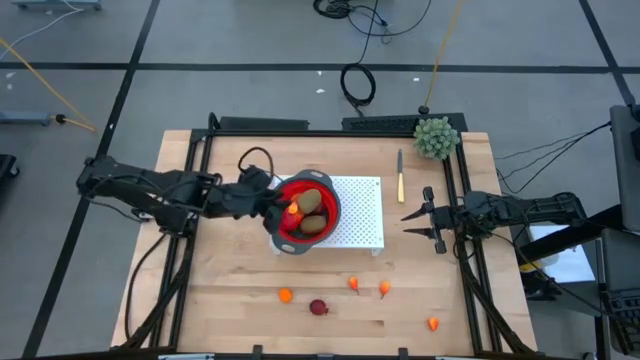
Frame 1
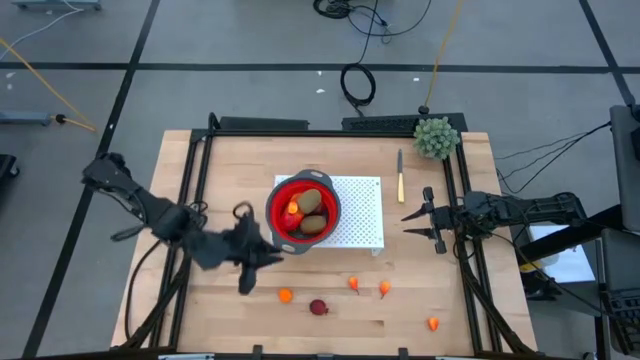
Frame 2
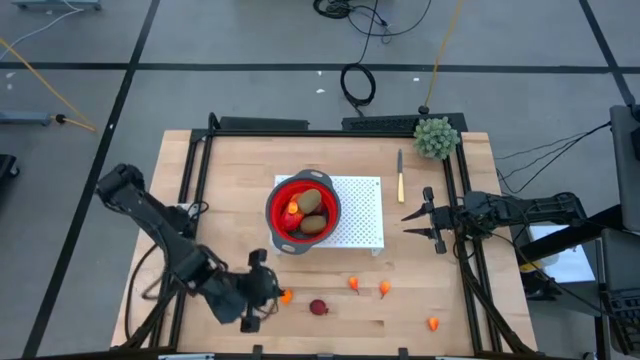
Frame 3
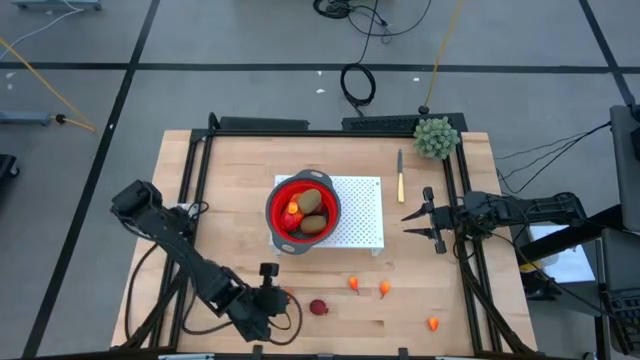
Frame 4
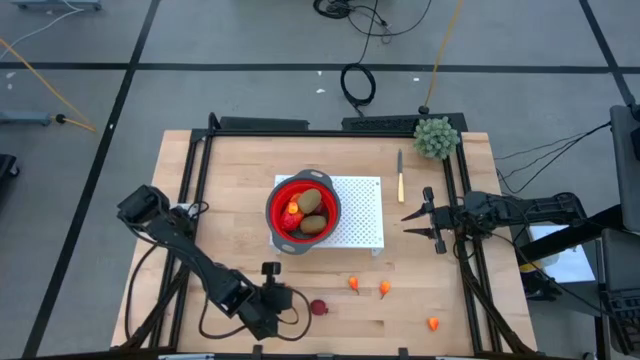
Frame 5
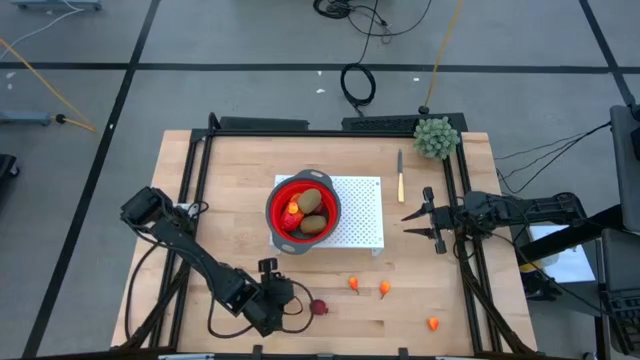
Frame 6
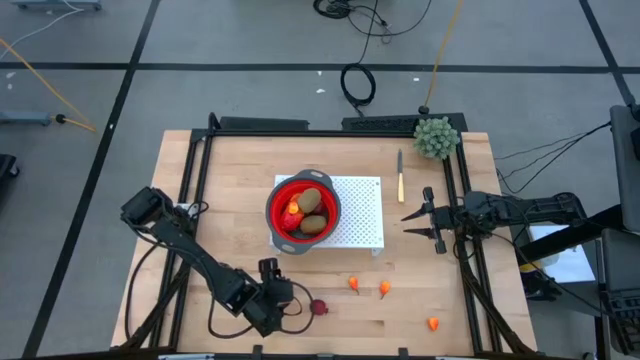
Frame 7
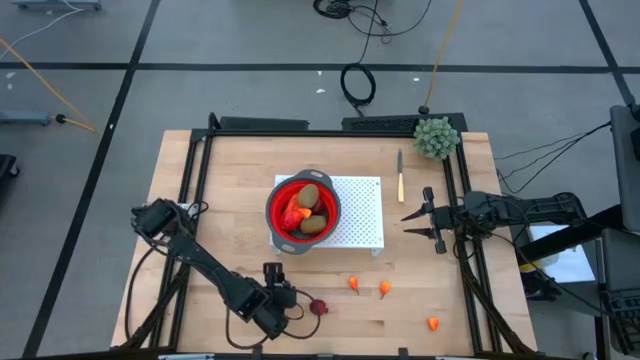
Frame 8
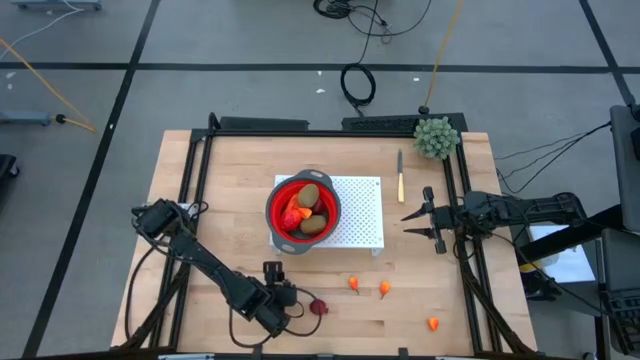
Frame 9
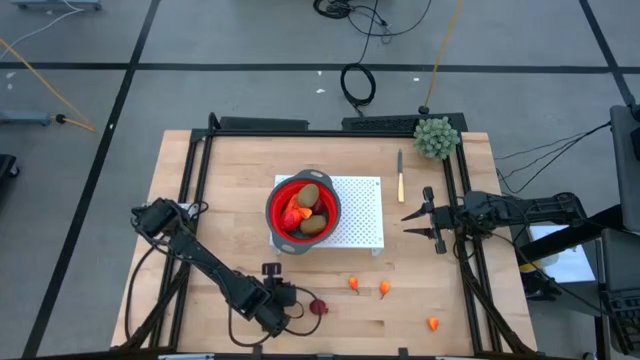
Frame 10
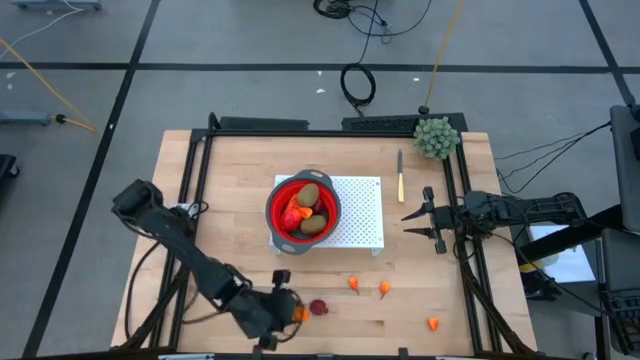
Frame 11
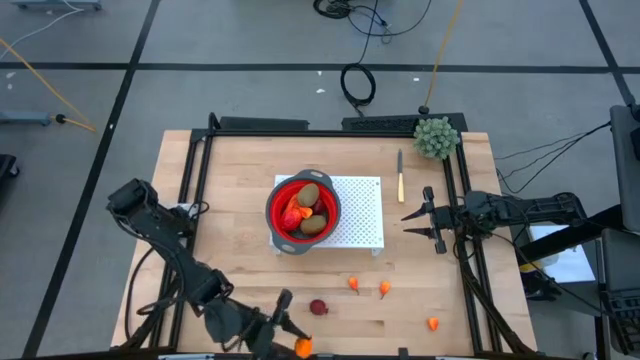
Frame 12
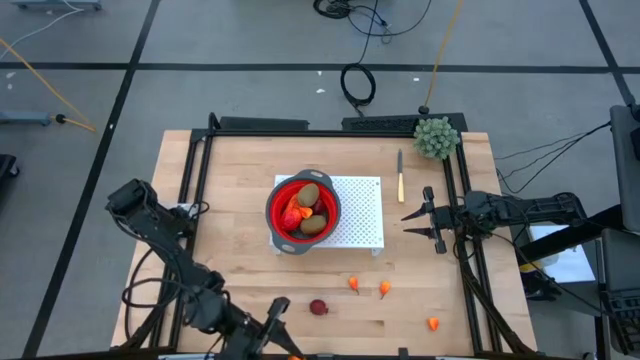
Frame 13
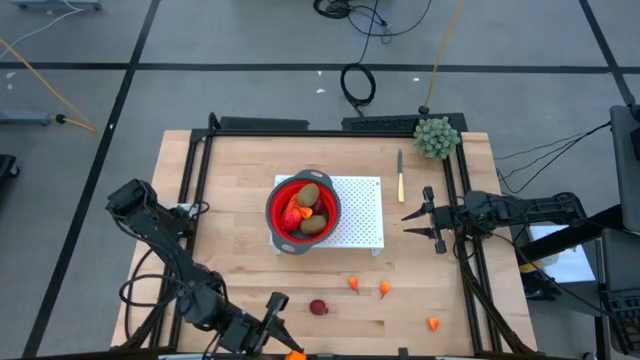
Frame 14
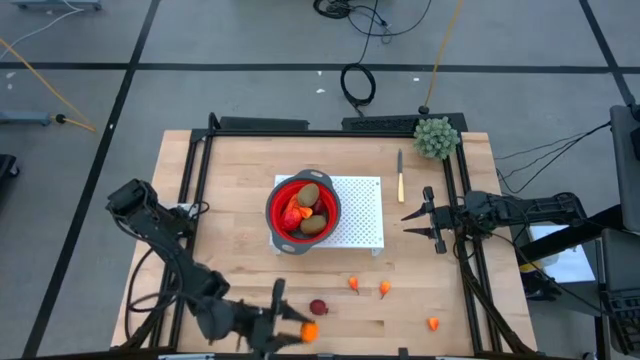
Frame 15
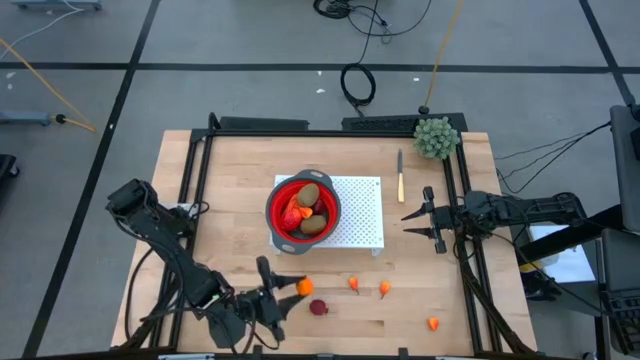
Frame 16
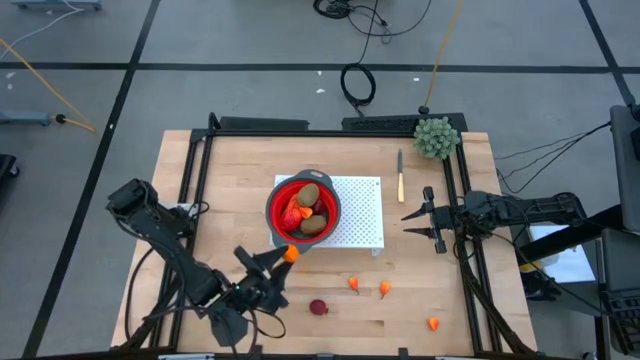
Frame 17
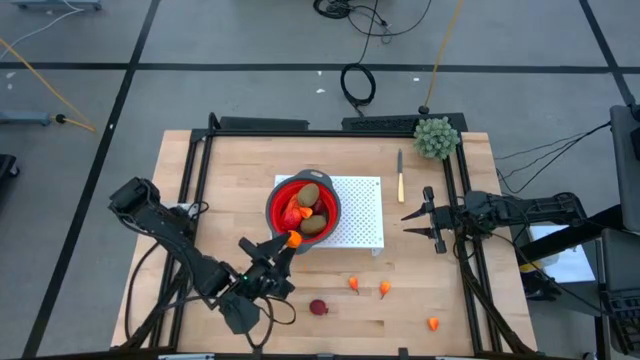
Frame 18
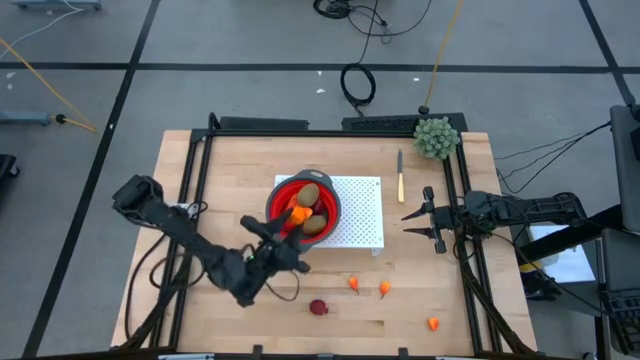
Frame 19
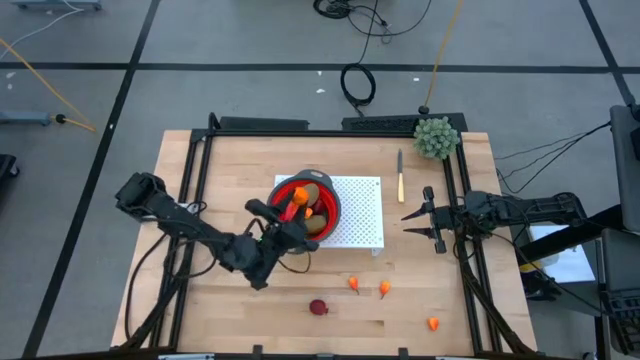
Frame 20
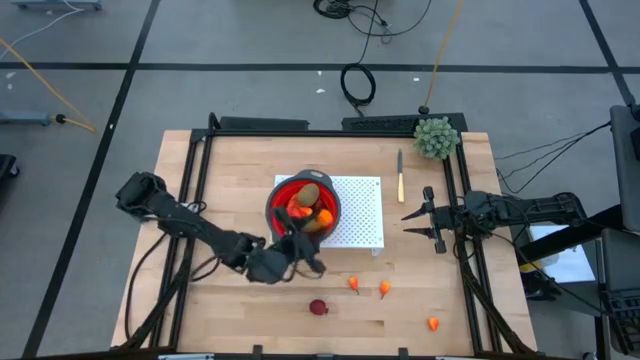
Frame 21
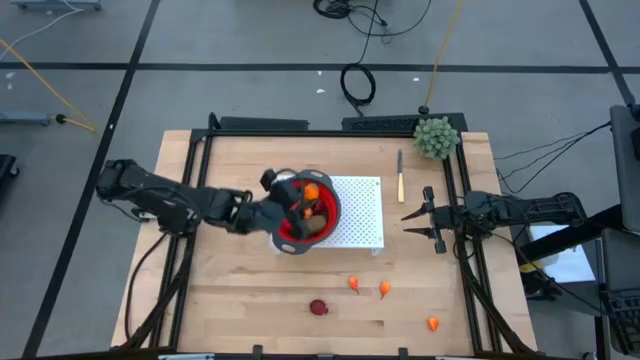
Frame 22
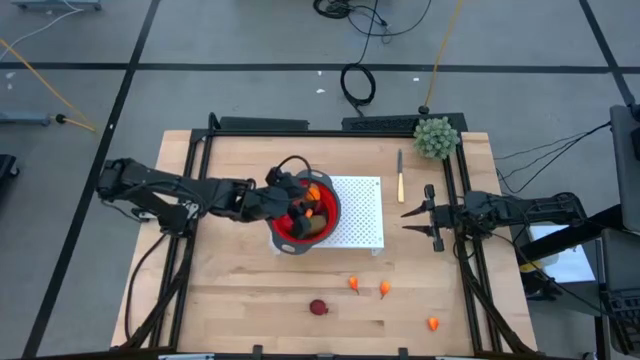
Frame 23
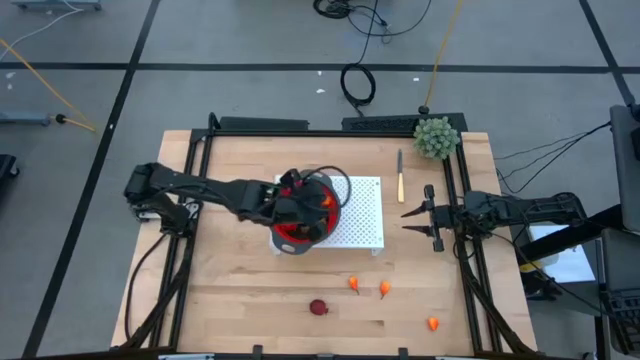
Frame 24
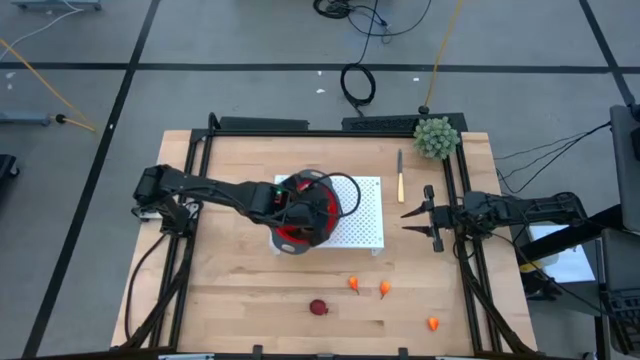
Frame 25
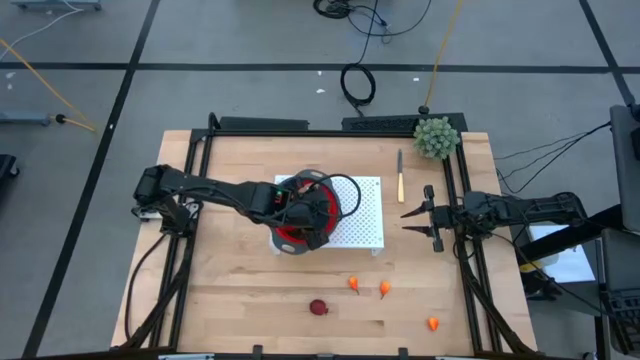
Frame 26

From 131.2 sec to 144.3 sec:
Task: Pick & Place Fruit
Put the orange into the strainer bowl on the shelf

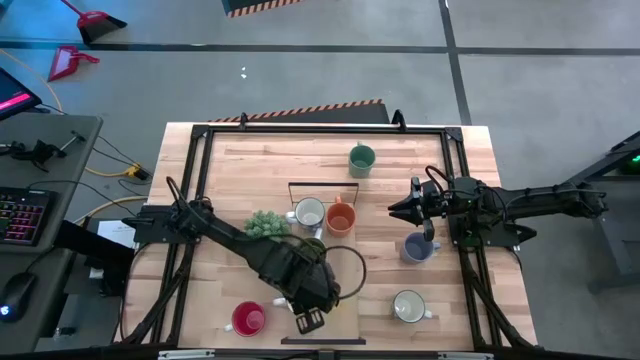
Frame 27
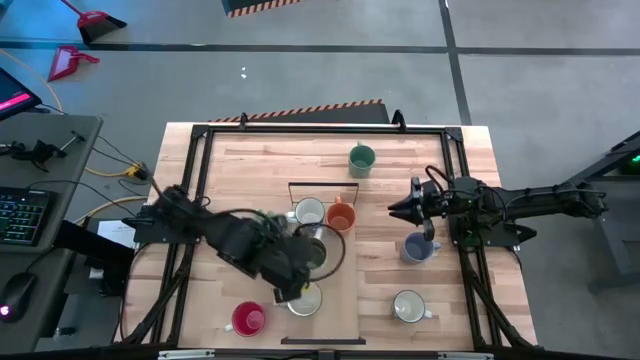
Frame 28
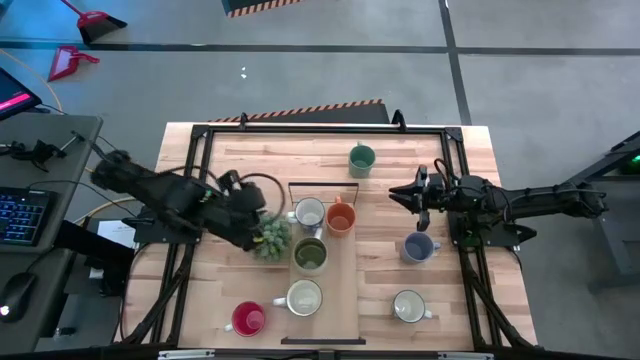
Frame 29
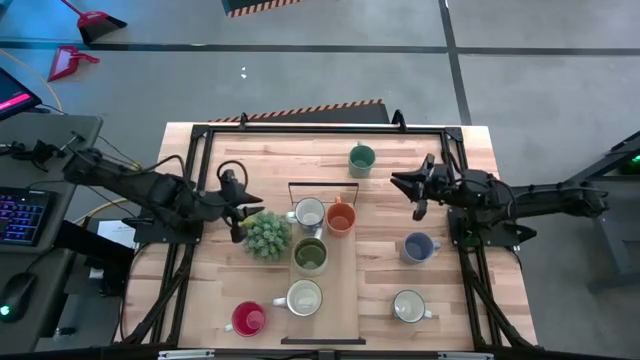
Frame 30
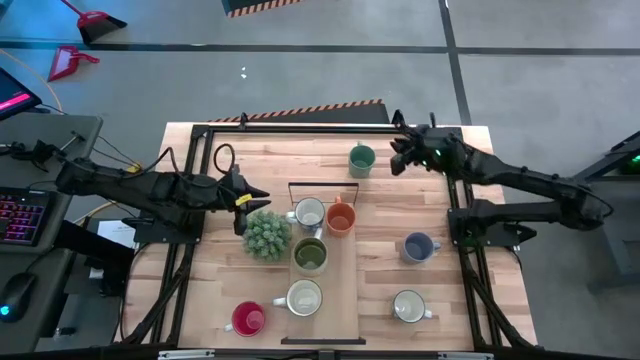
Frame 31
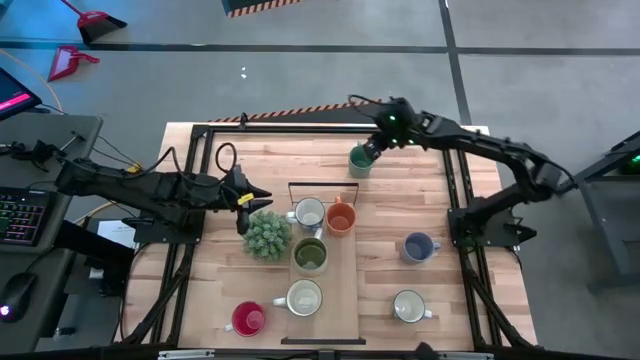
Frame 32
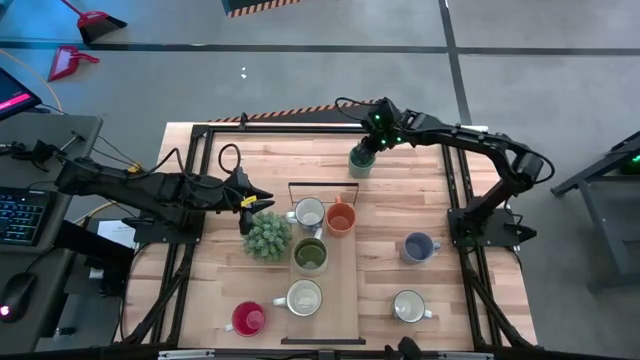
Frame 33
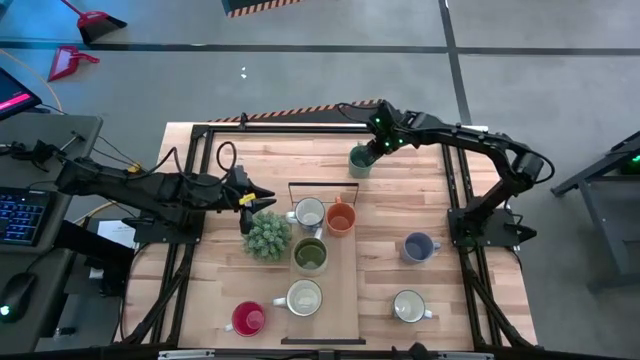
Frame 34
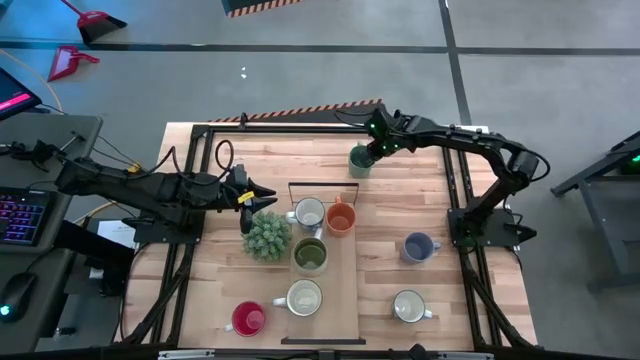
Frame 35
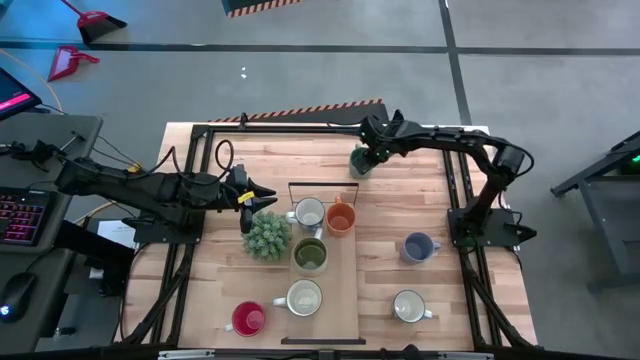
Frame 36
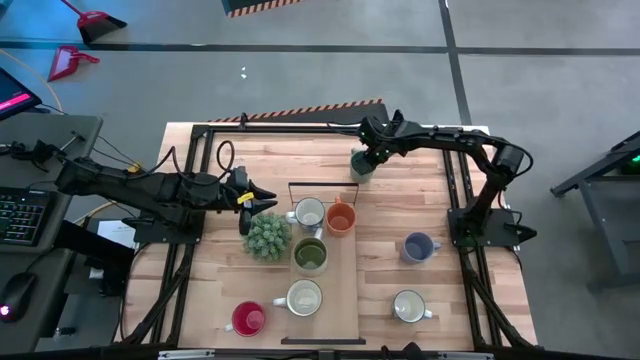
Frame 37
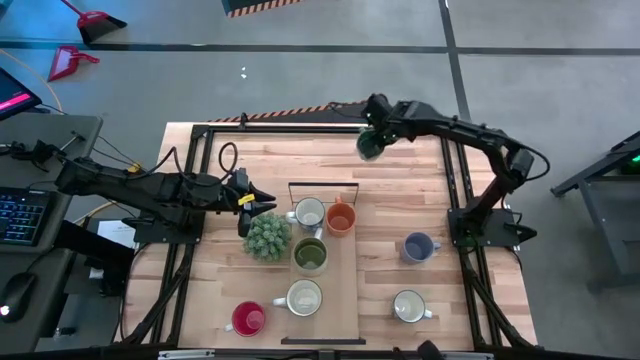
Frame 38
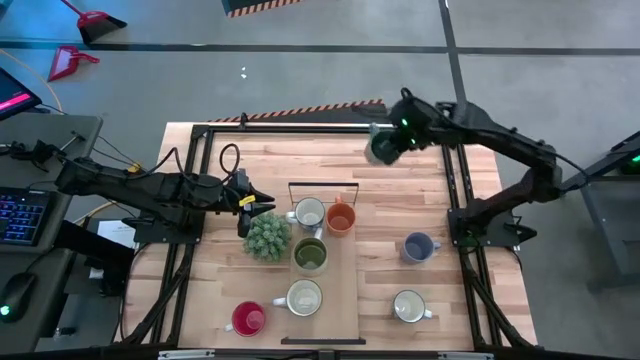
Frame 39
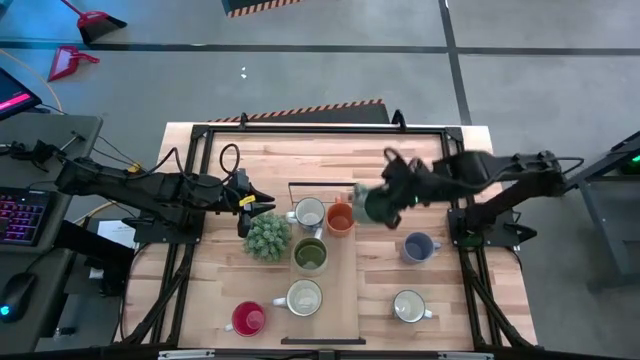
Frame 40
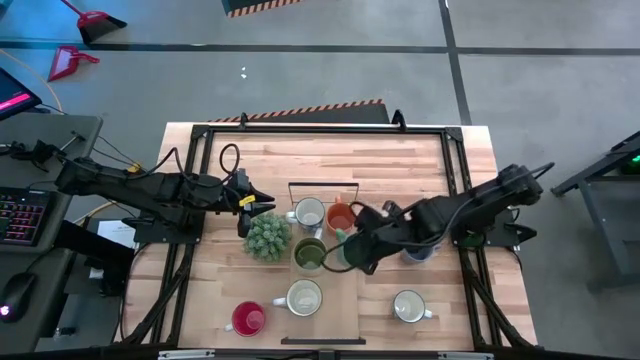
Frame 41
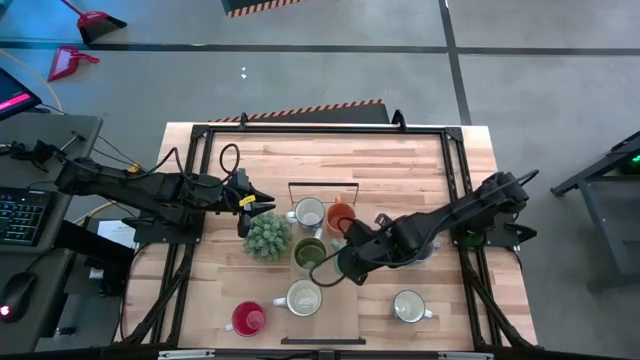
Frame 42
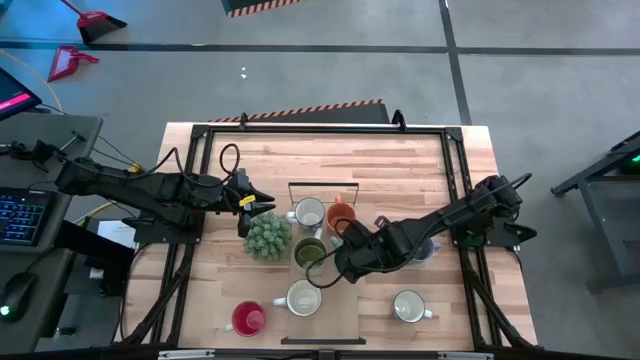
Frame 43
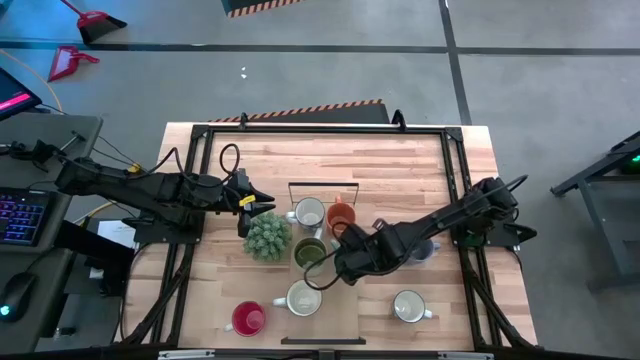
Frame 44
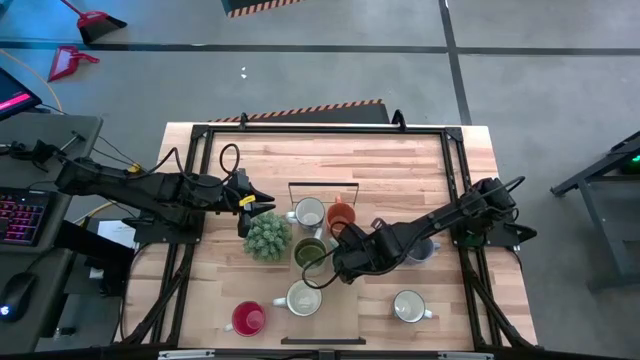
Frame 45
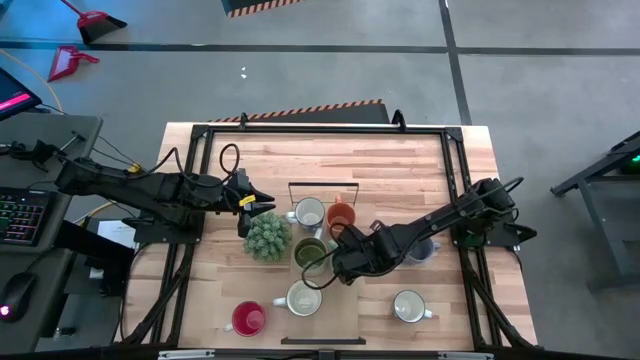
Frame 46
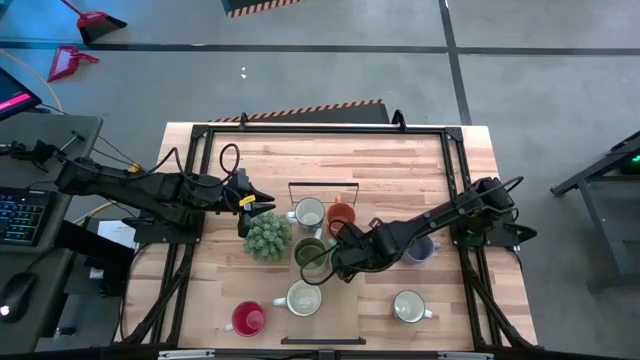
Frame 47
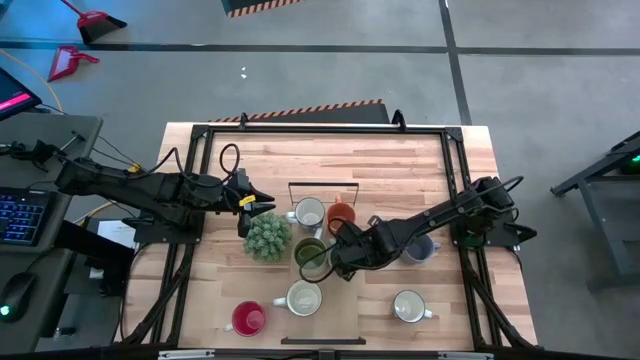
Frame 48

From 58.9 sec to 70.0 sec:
Task: Place coffee mugs
Put the green mug on the shelf
